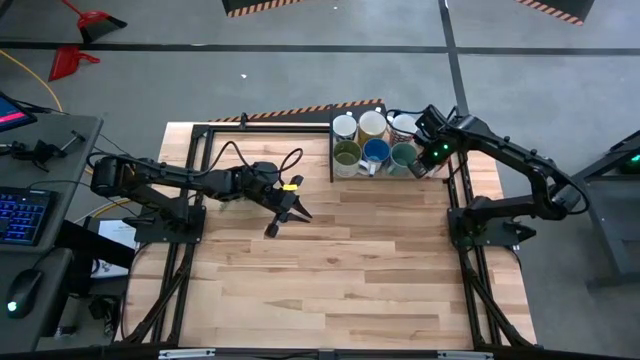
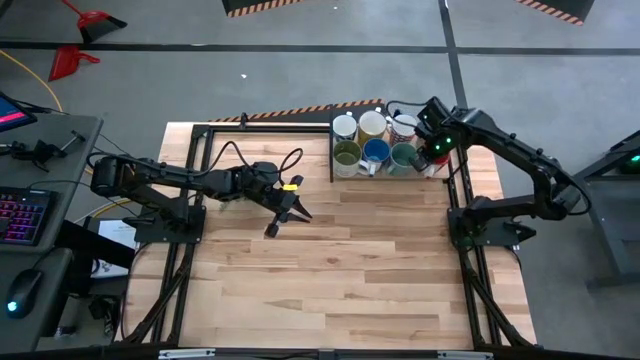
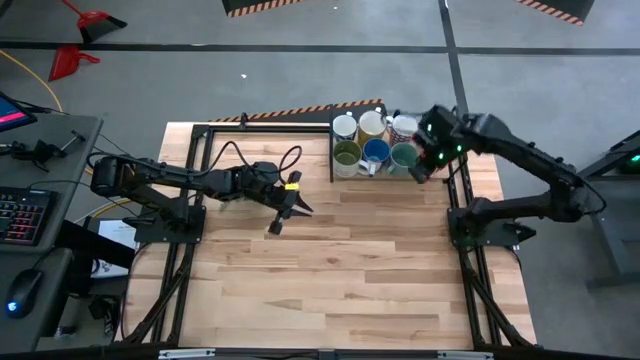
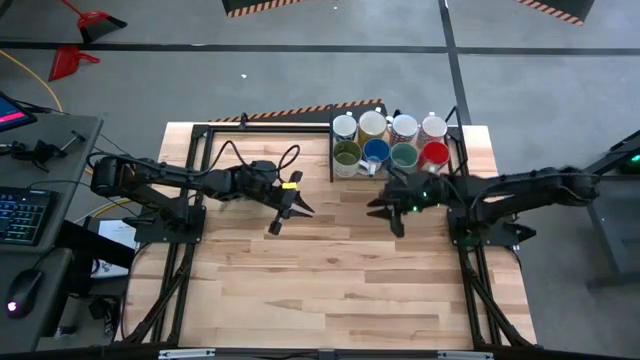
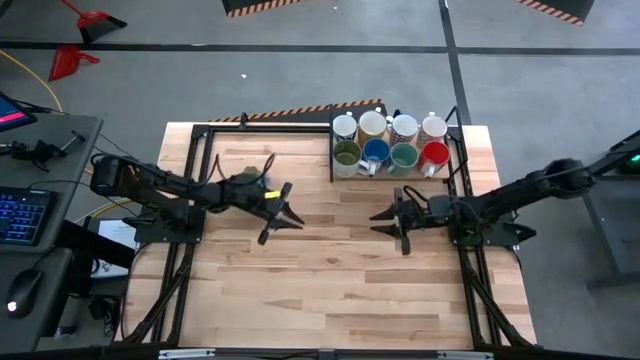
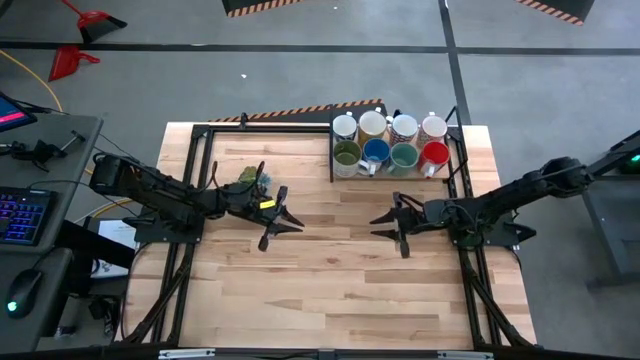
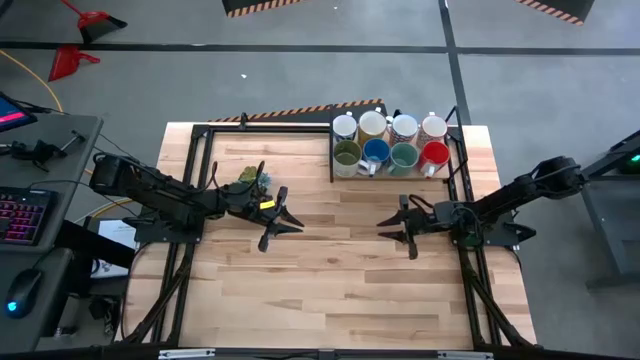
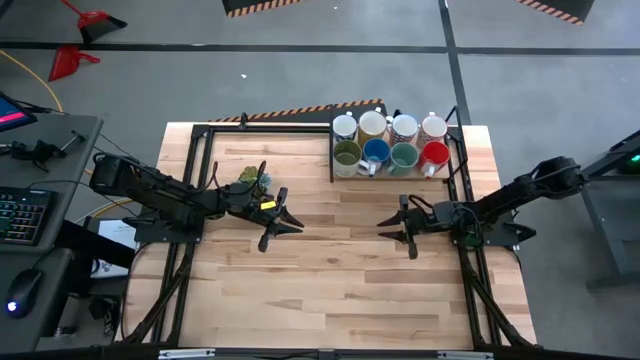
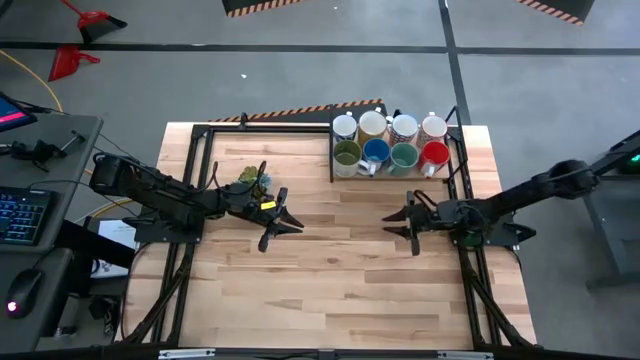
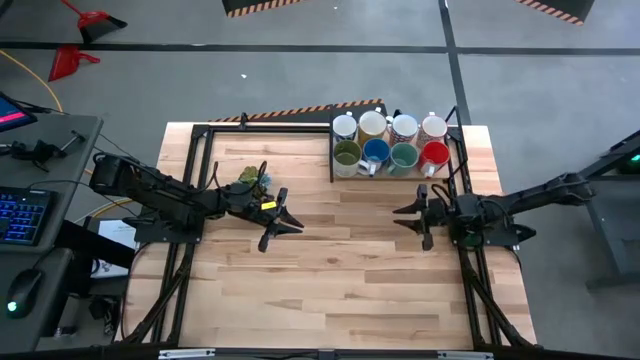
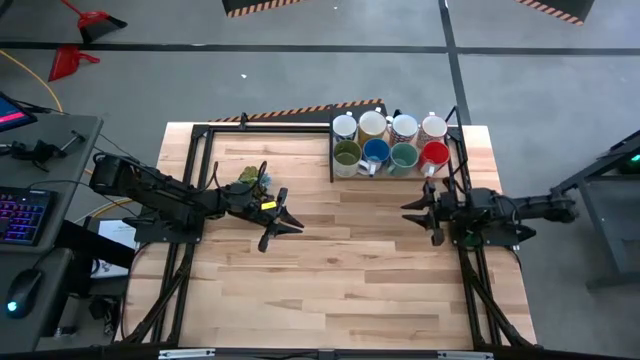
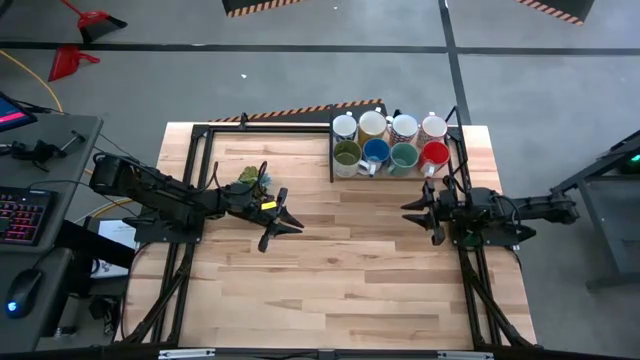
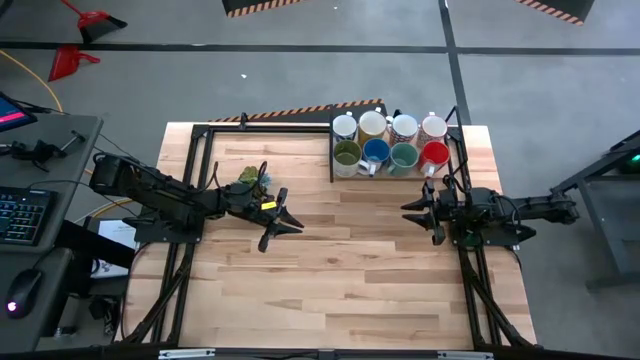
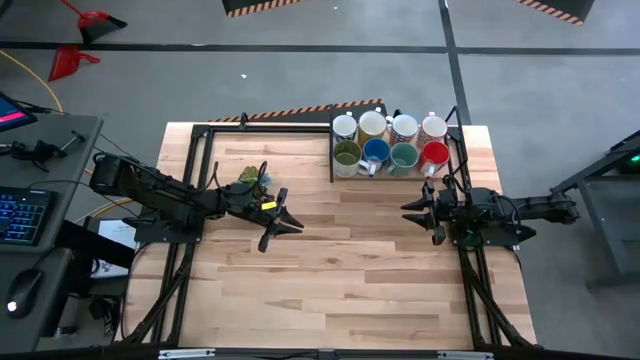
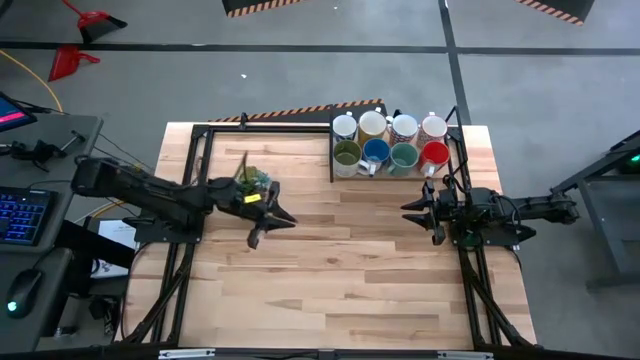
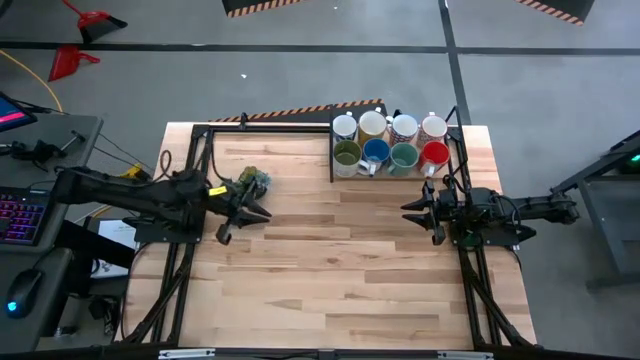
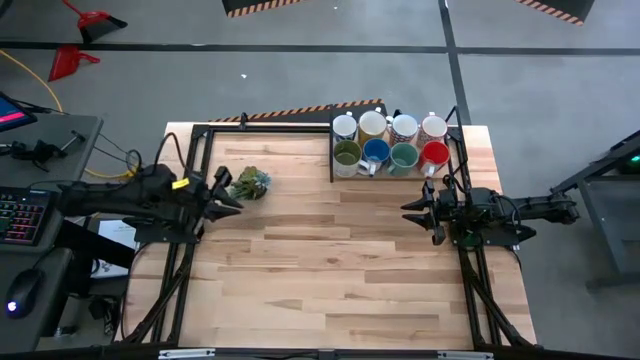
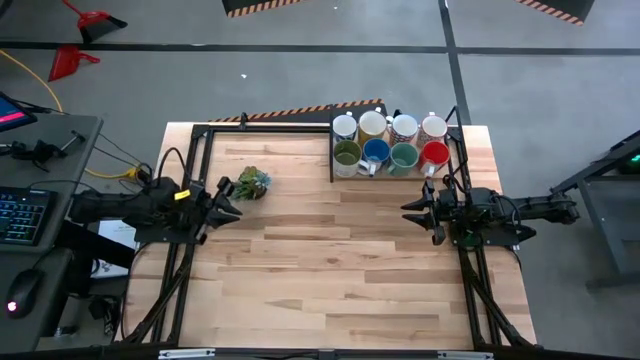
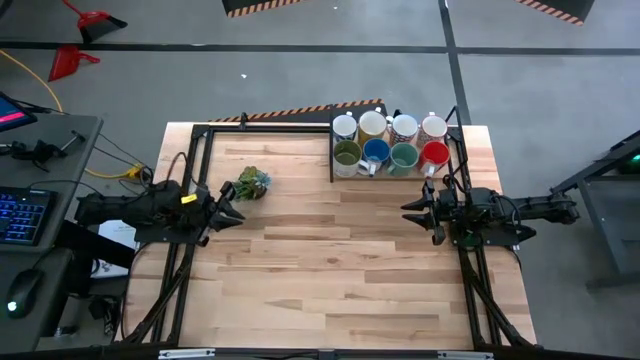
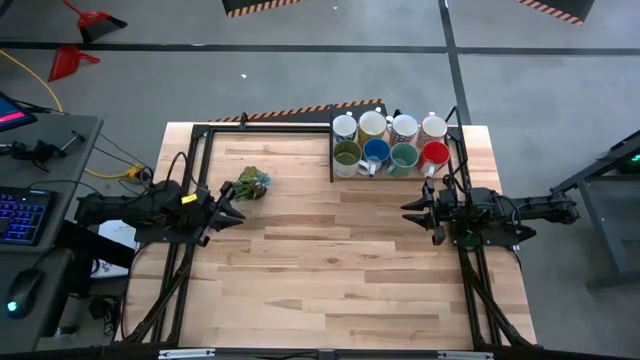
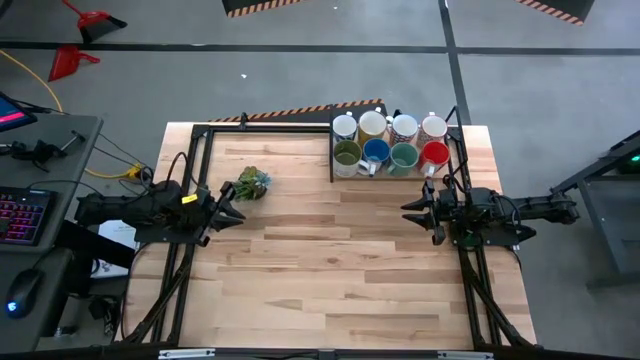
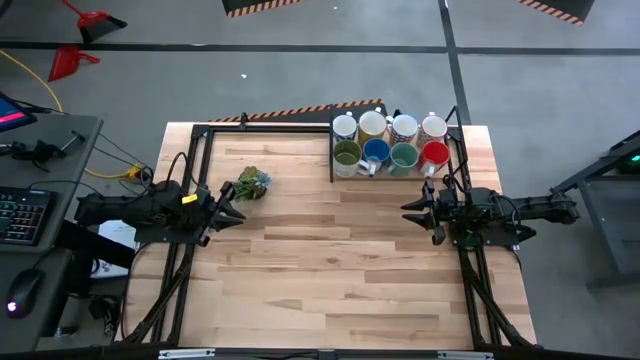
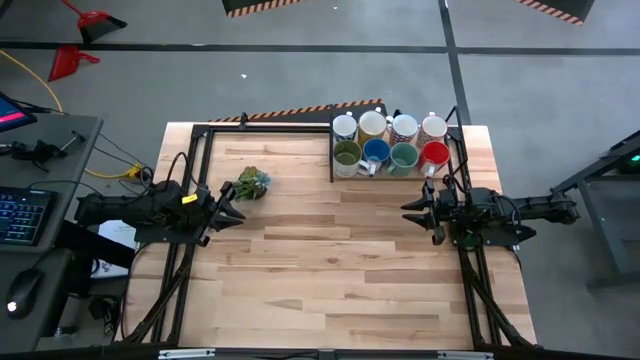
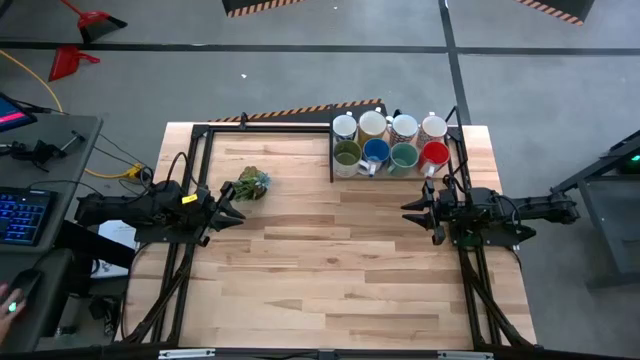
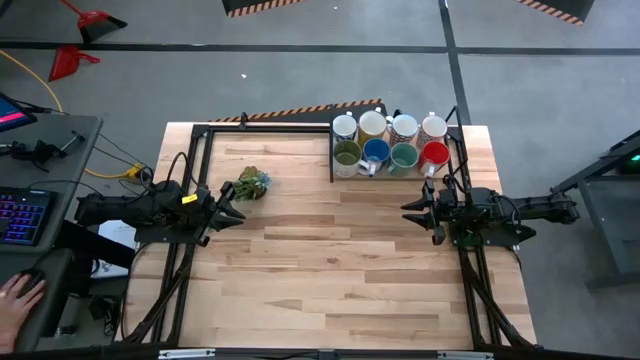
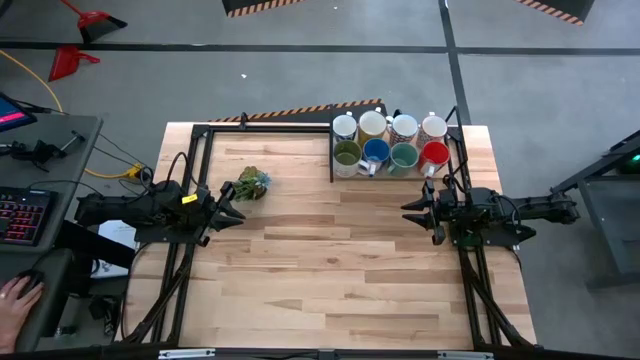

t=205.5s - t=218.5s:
Task: Place coffee mugs
Return to Home Position
